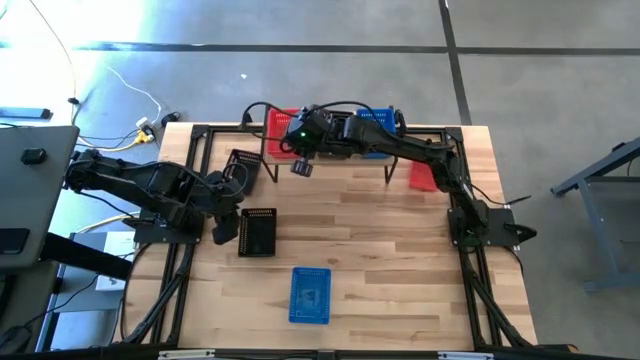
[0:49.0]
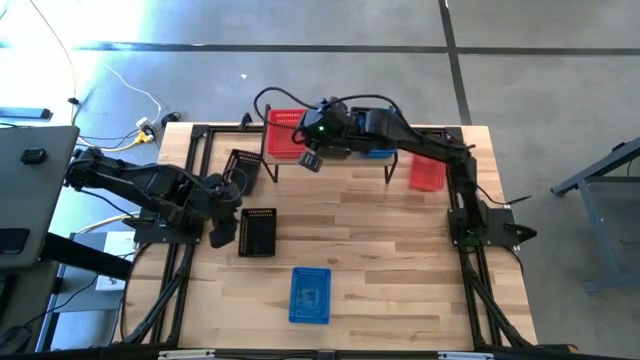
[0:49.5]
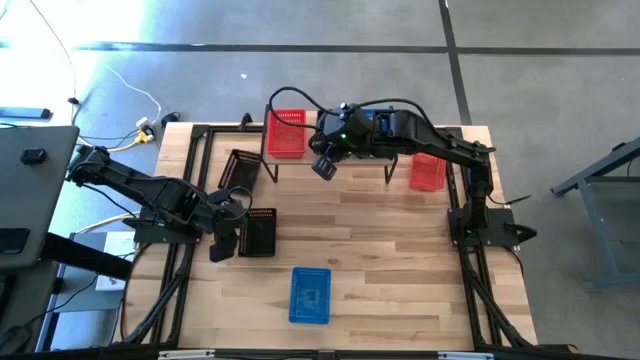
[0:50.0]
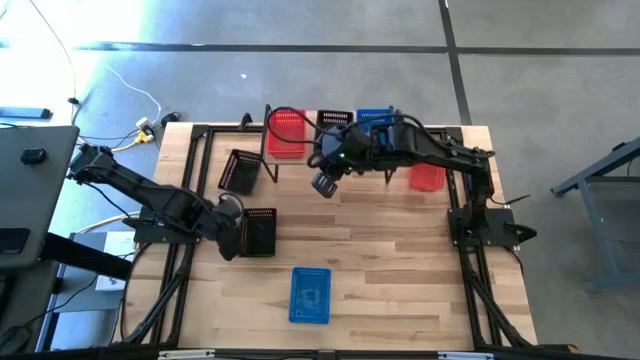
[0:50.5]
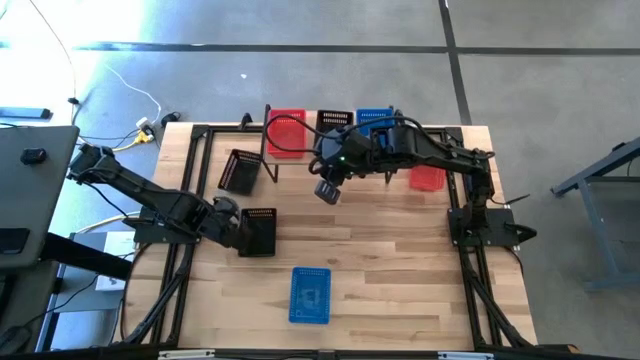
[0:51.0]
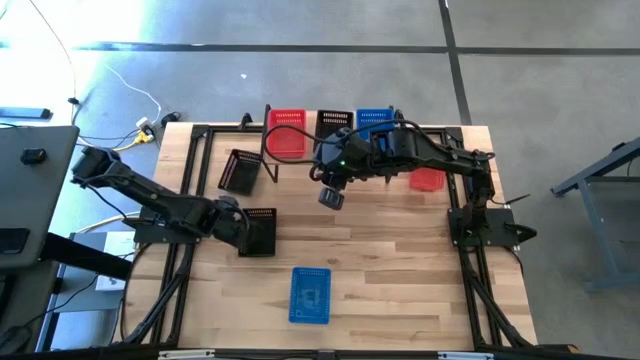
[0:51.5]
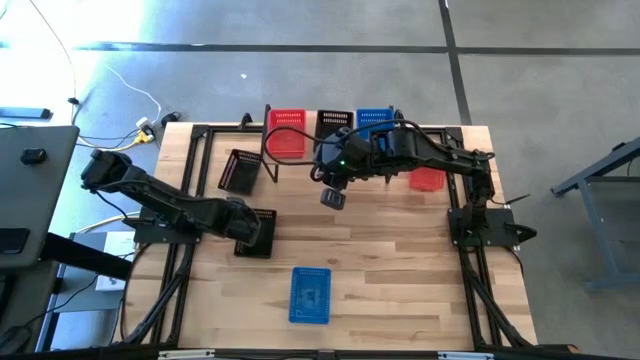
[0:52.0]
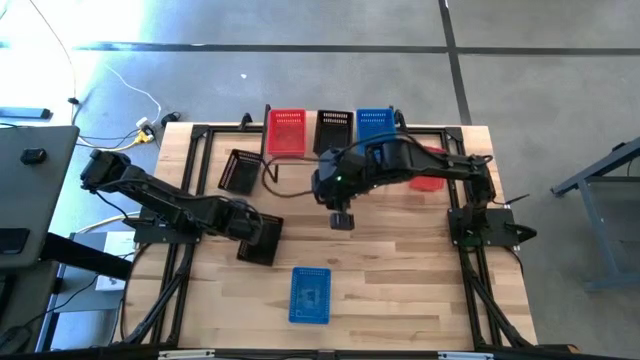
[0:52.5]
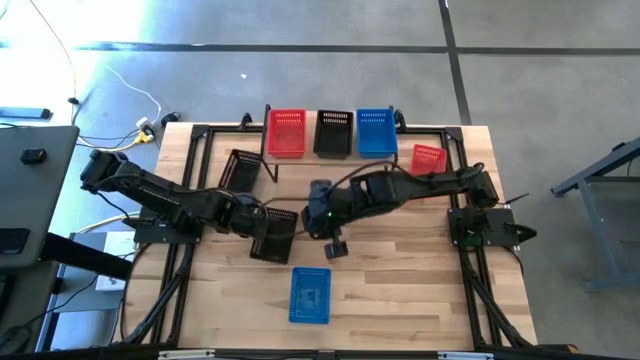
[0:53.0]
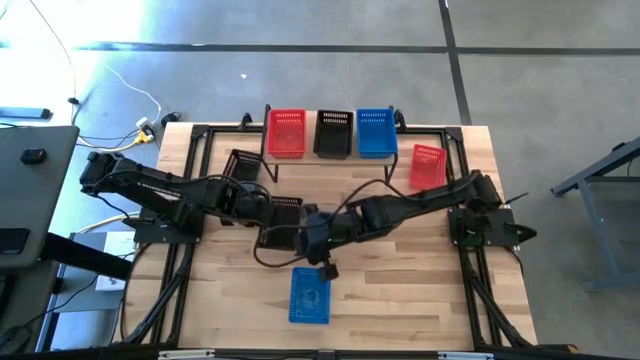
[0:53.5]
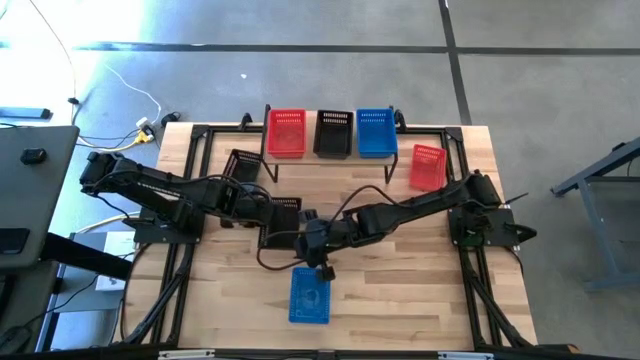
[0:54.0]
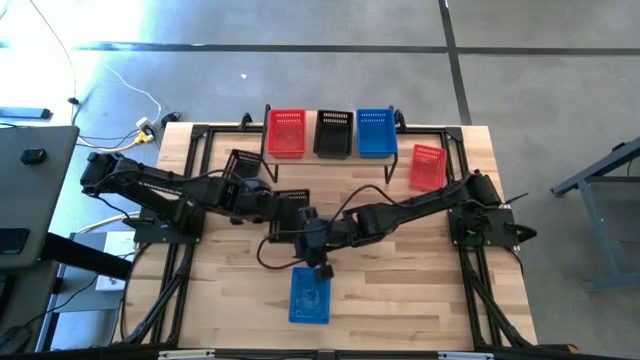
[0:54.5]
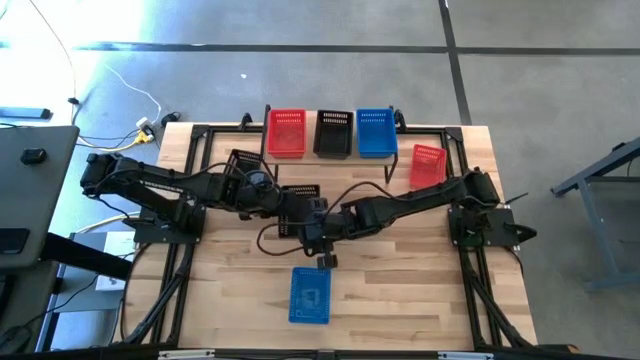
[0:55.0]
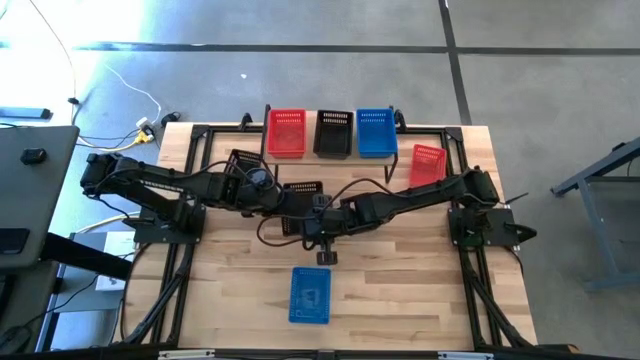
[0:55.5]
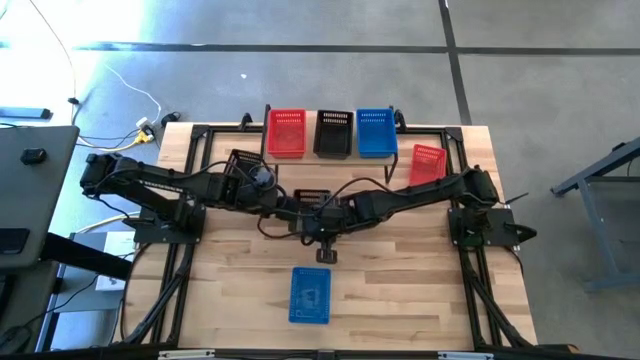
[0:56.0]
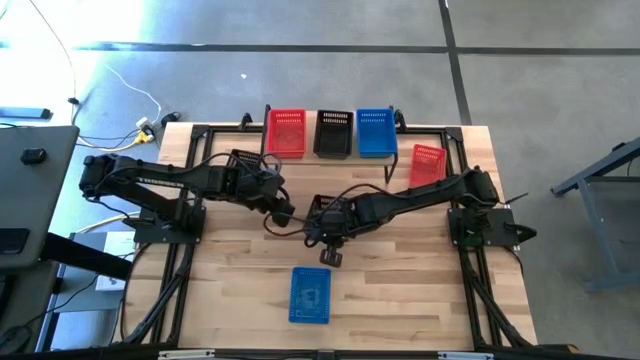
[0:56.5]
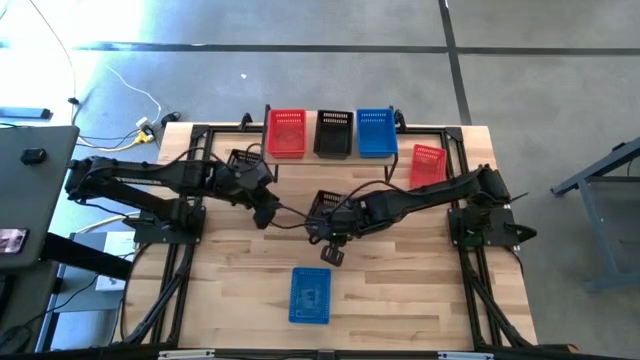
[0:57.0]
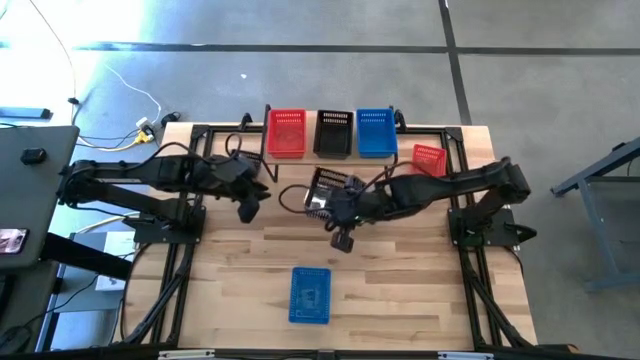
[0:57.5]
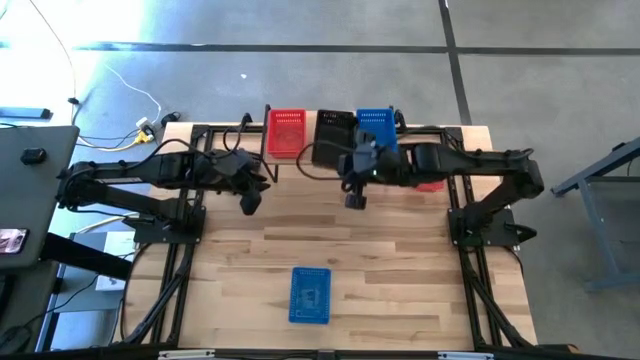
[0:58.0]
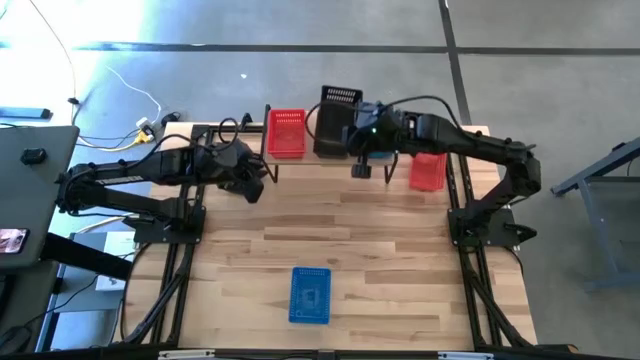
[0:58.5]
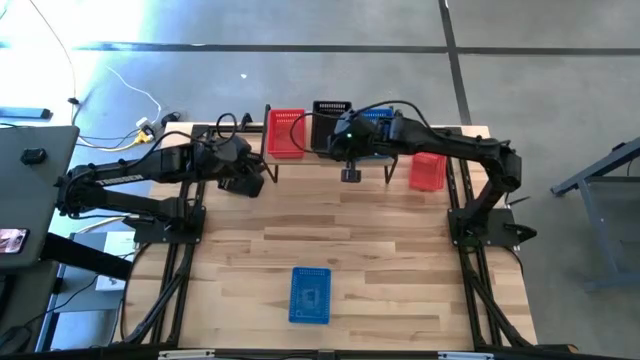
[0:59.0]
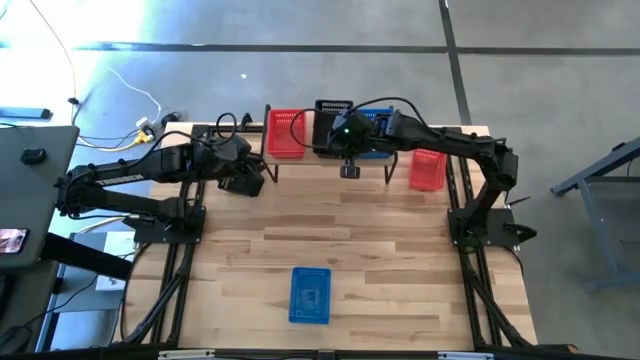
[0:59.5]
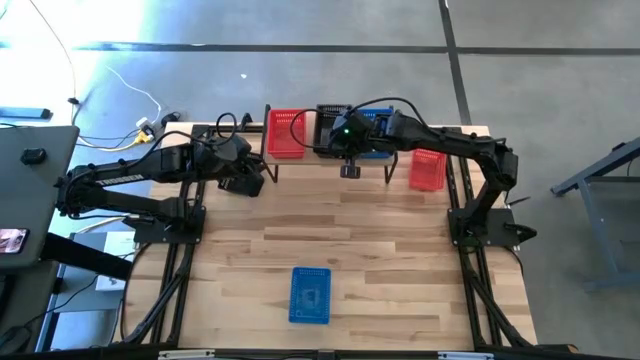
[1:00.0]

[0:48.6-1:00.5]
Task: Stack baskets on shelf by color
Stack the bottom black bin on top of the black bin on the shelf

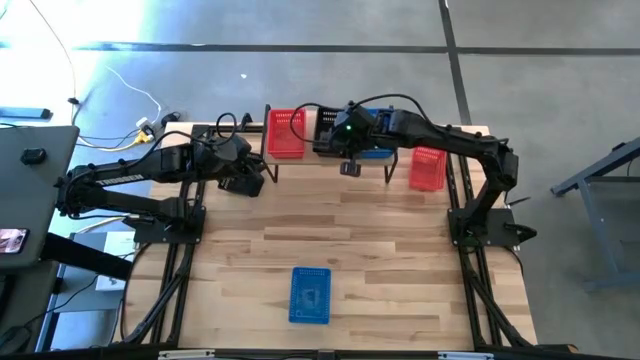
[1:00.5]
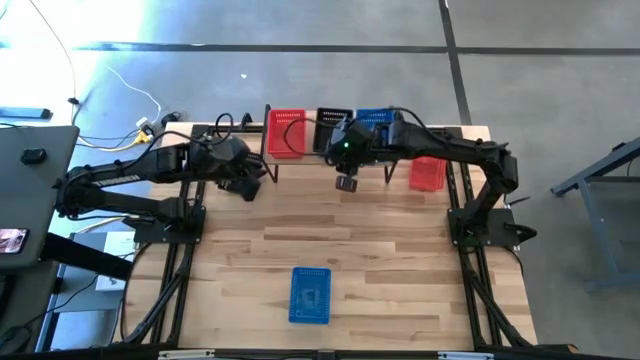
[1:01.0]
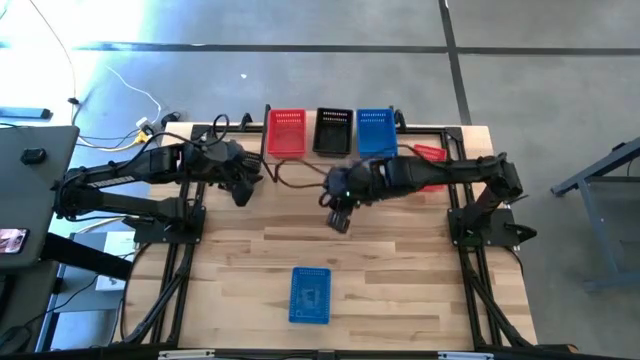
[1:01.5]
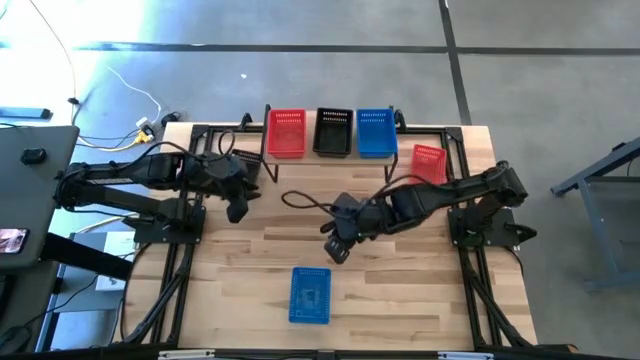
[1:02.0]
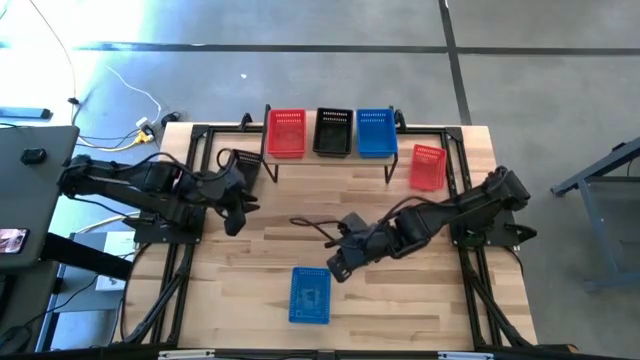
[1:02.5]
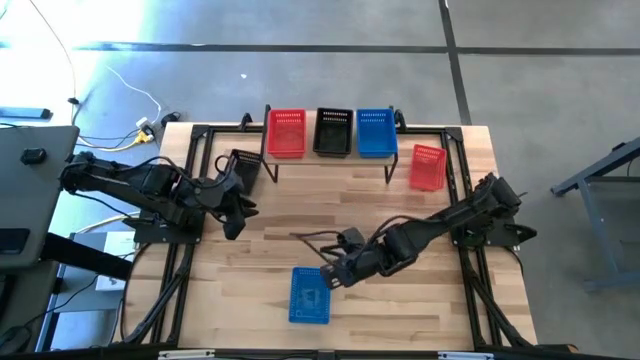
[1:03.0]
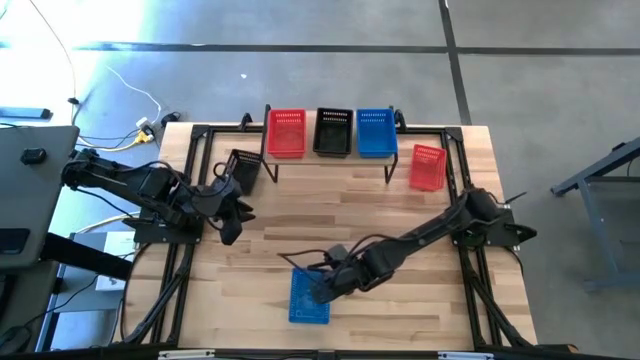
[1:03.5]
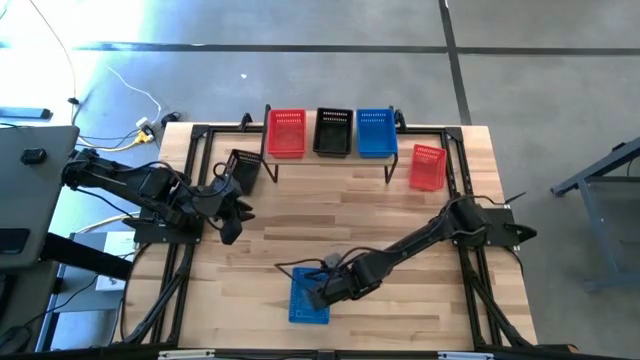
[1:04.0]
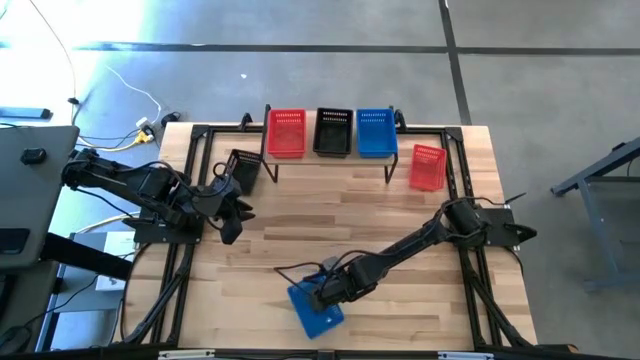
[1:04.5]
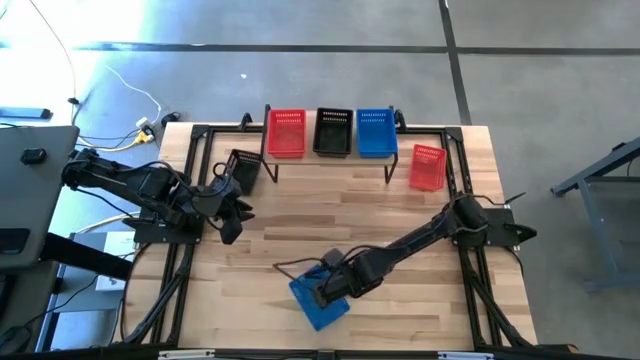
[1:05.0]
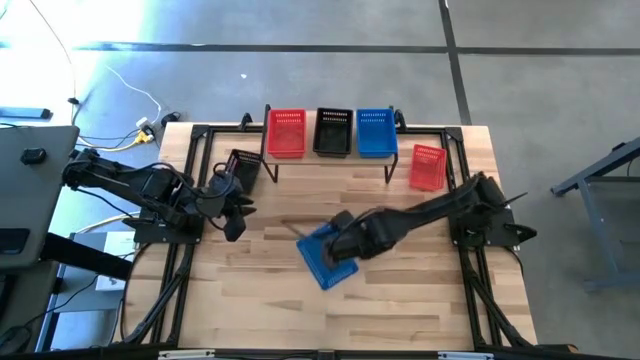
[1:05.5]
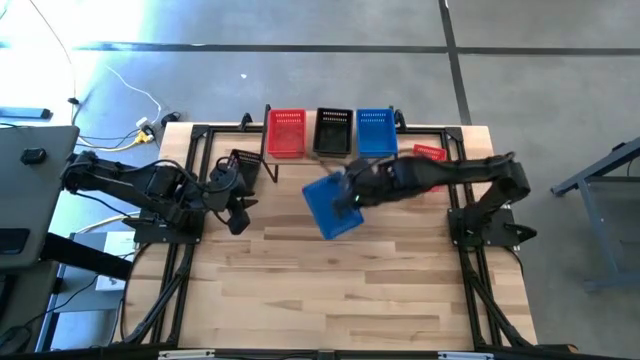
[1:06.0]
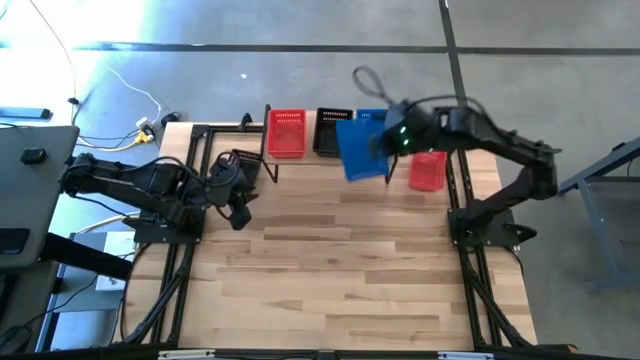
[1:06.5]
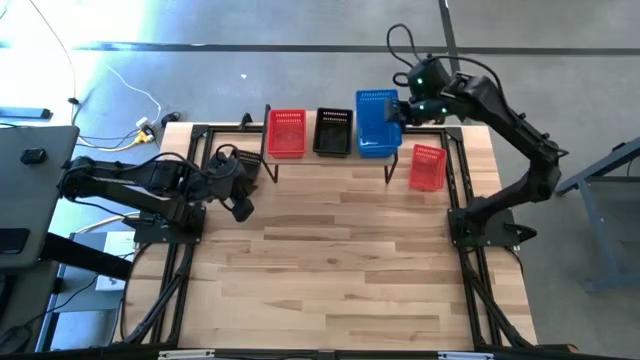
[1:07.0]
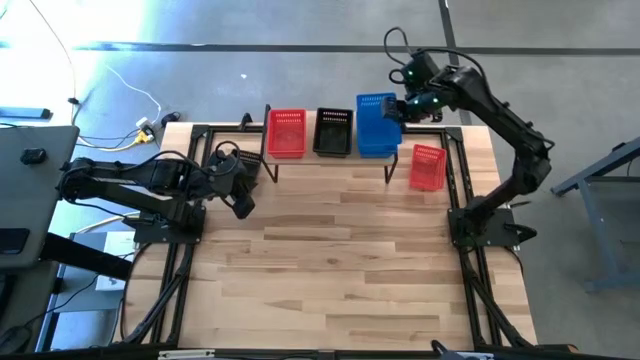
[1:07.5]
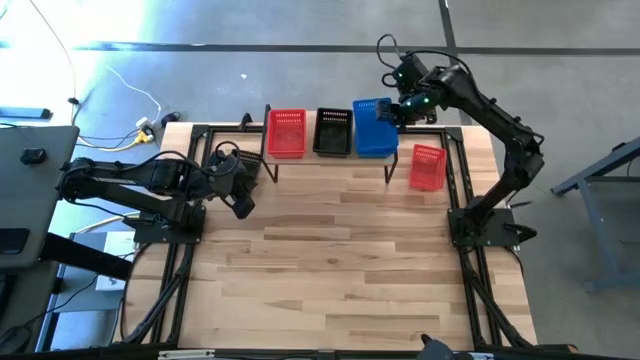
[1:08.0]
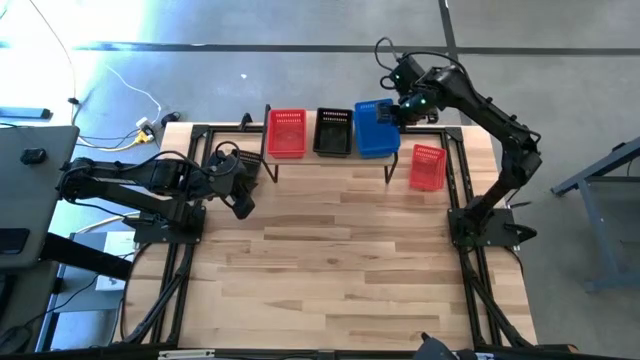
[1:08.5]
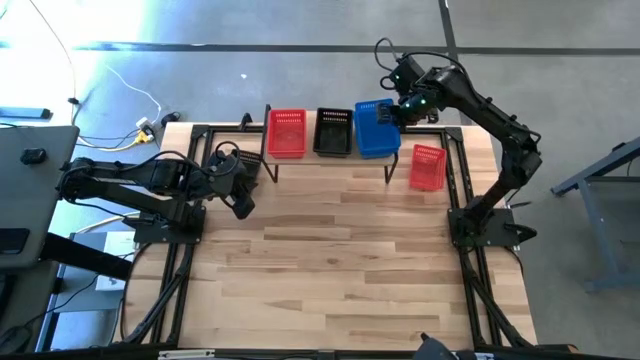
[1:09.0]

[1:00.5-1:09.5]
Stack the blue bin on top of the stacked blue bins on the shelf
